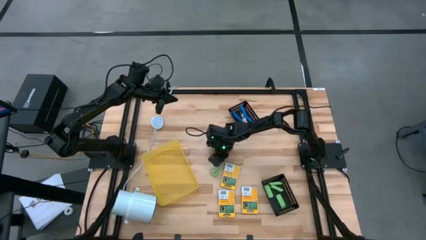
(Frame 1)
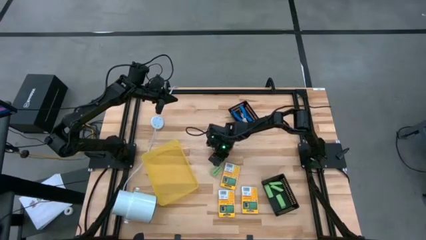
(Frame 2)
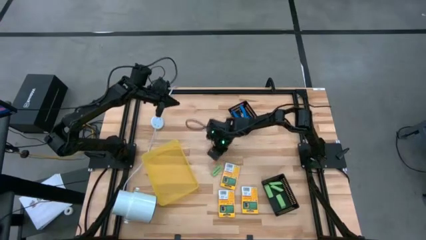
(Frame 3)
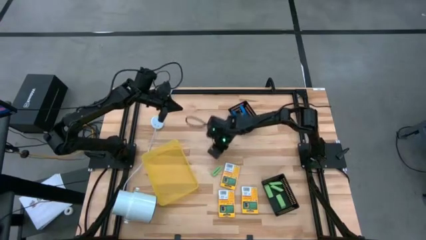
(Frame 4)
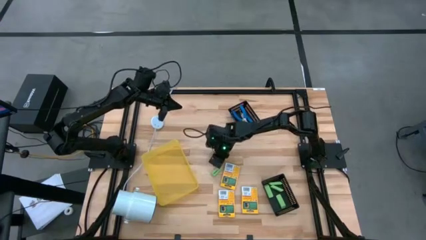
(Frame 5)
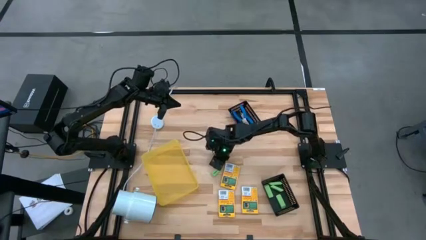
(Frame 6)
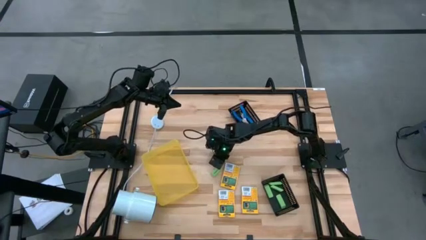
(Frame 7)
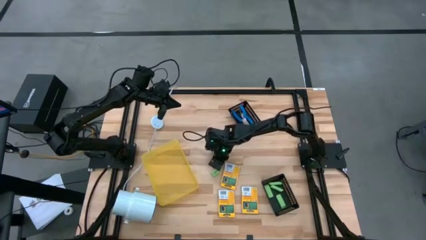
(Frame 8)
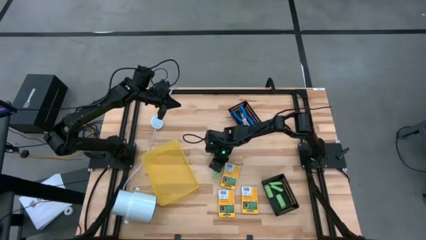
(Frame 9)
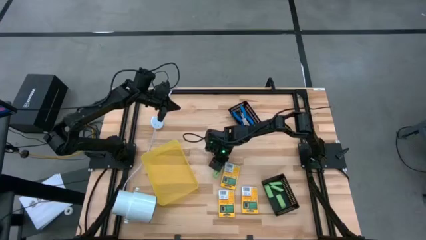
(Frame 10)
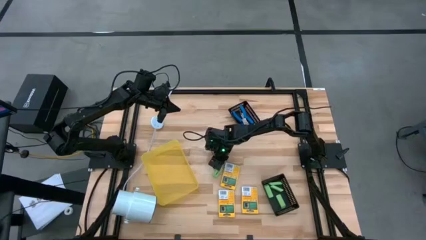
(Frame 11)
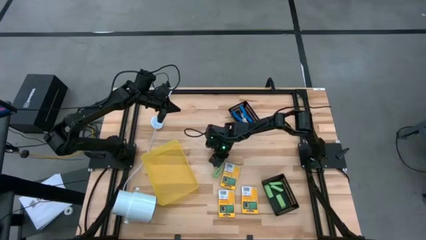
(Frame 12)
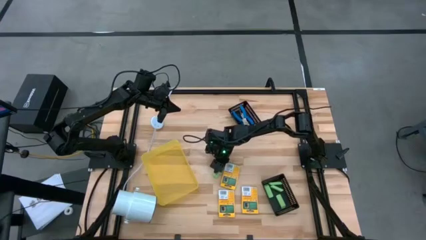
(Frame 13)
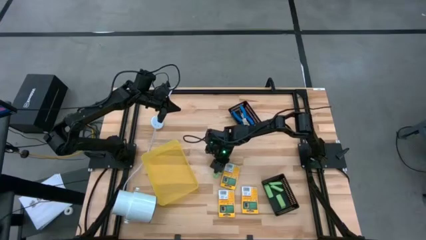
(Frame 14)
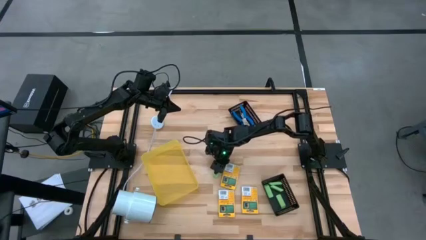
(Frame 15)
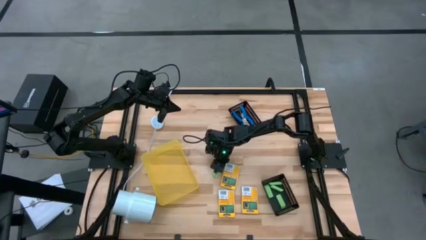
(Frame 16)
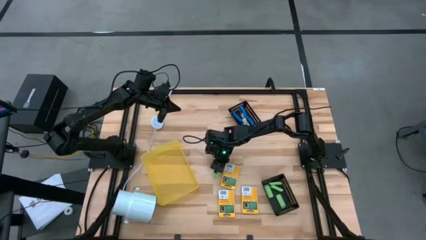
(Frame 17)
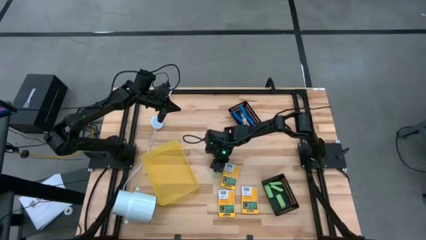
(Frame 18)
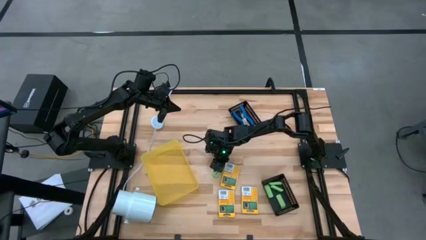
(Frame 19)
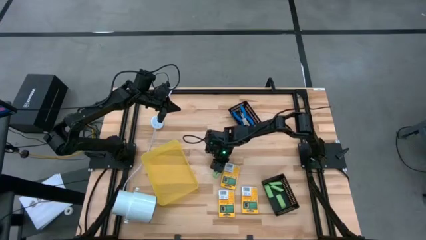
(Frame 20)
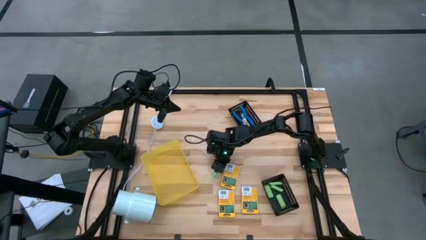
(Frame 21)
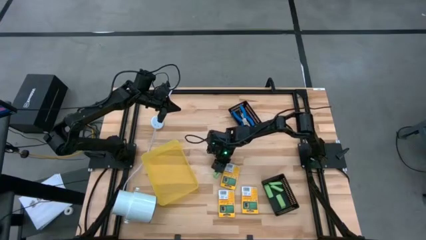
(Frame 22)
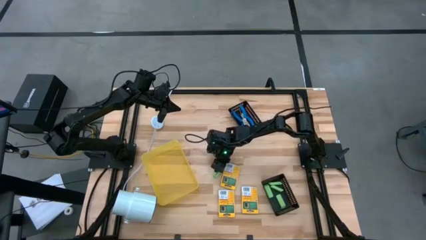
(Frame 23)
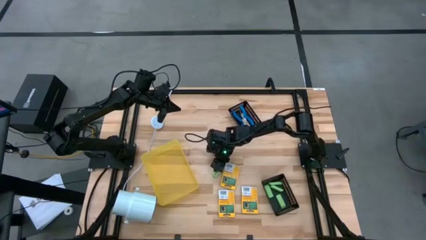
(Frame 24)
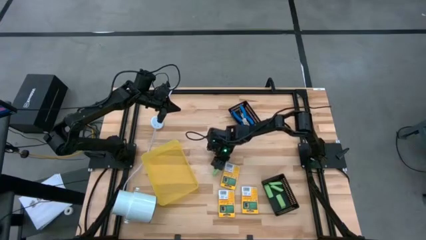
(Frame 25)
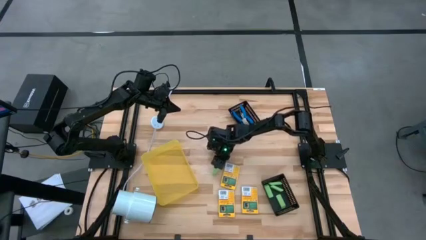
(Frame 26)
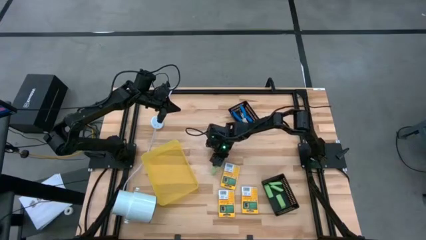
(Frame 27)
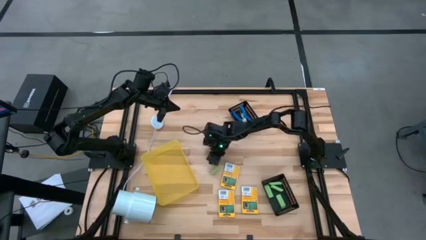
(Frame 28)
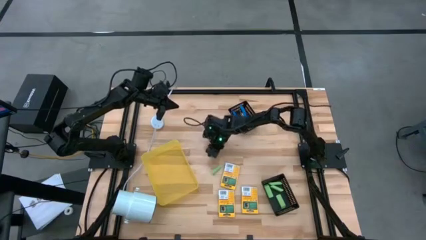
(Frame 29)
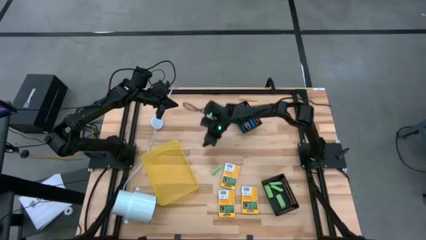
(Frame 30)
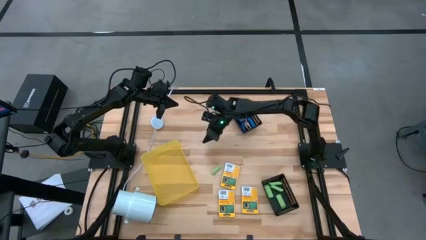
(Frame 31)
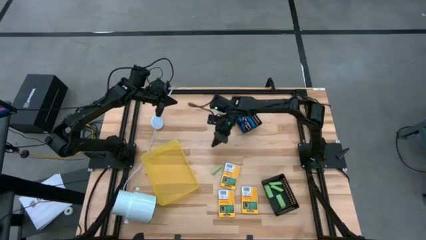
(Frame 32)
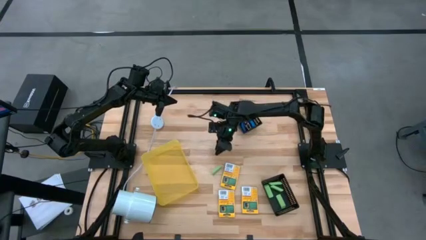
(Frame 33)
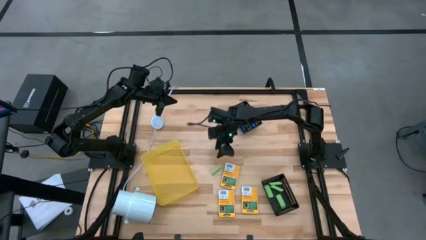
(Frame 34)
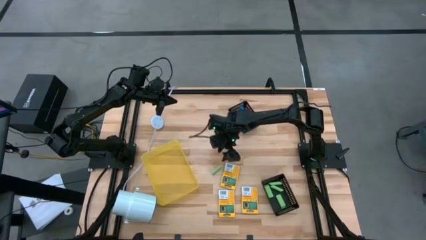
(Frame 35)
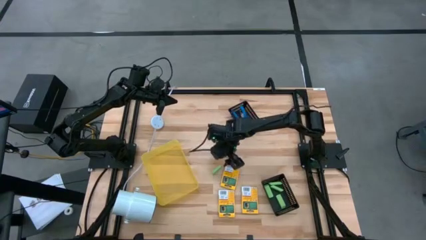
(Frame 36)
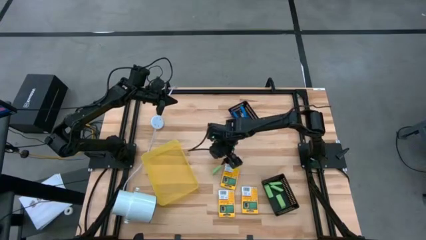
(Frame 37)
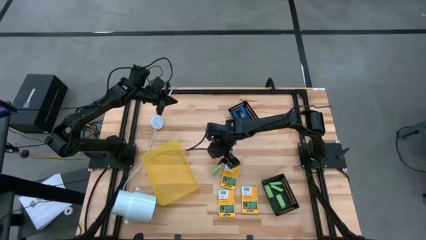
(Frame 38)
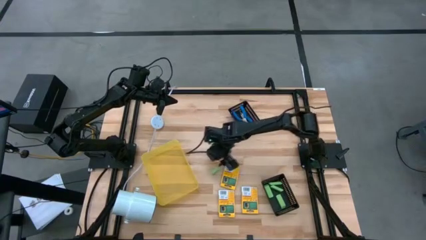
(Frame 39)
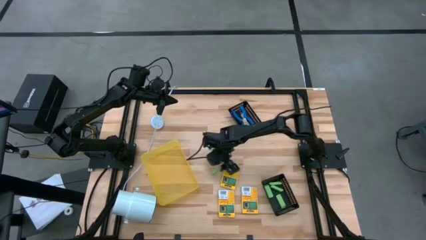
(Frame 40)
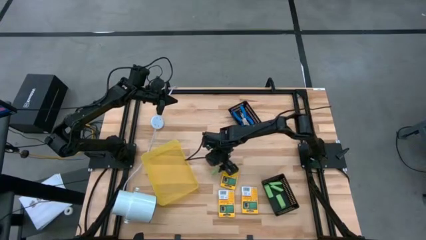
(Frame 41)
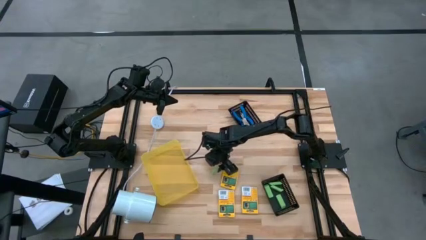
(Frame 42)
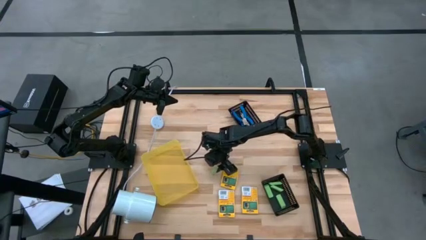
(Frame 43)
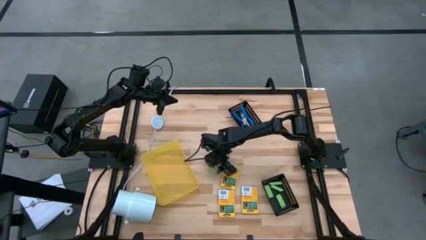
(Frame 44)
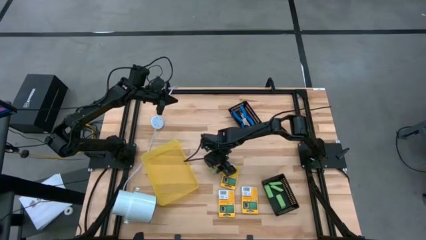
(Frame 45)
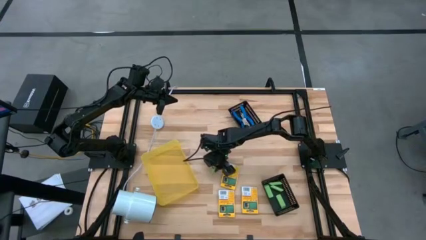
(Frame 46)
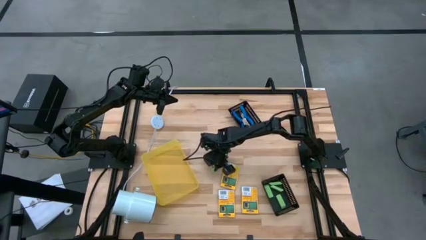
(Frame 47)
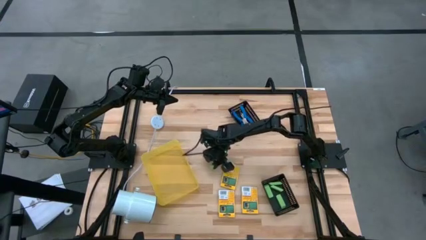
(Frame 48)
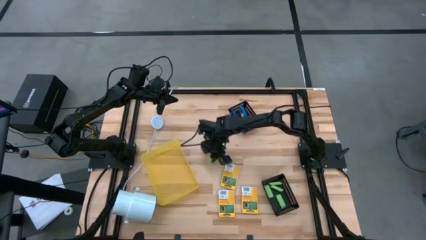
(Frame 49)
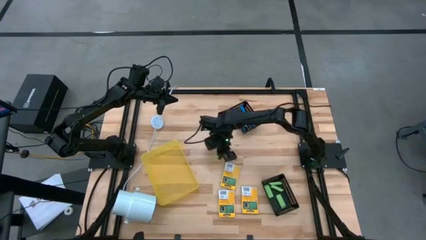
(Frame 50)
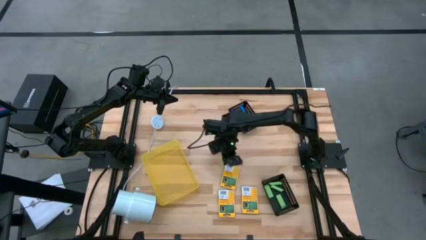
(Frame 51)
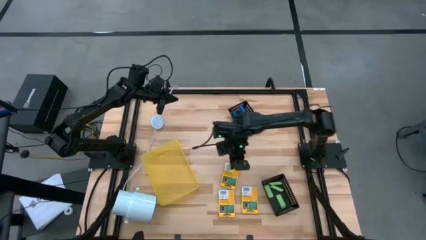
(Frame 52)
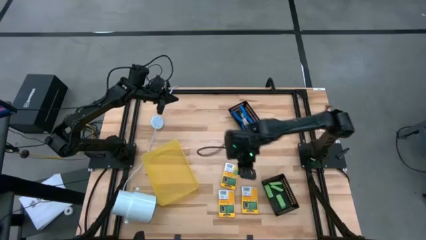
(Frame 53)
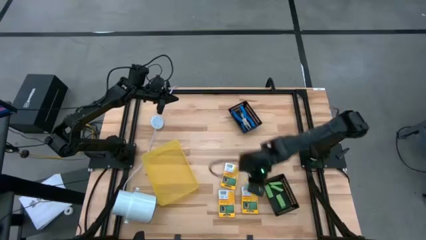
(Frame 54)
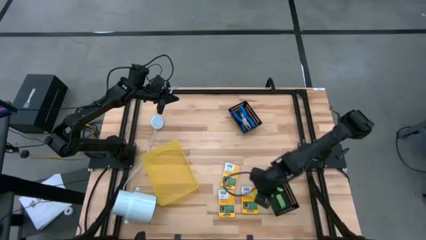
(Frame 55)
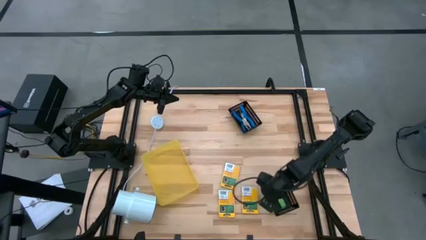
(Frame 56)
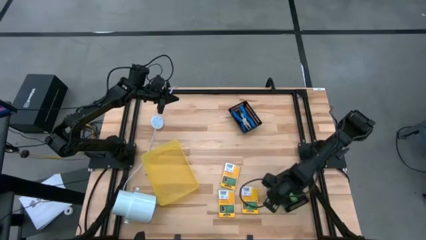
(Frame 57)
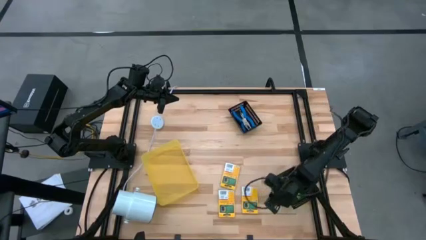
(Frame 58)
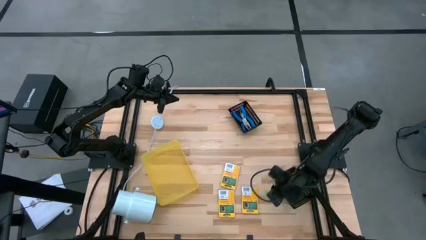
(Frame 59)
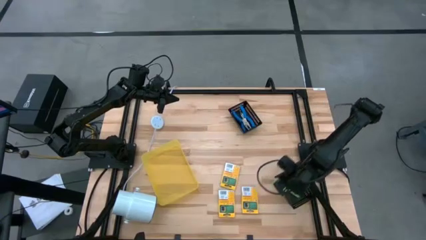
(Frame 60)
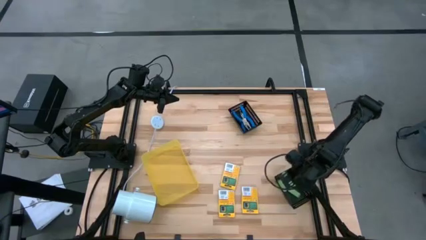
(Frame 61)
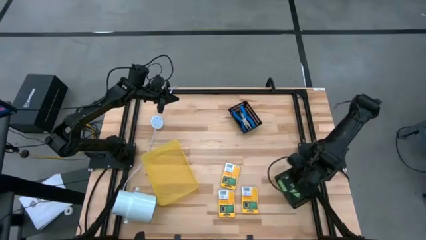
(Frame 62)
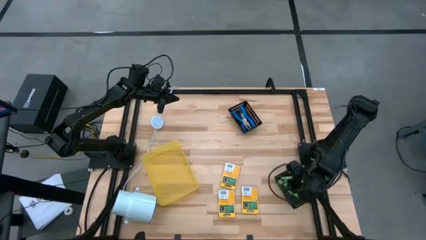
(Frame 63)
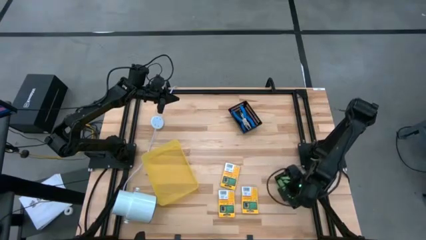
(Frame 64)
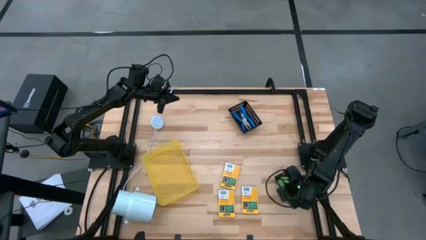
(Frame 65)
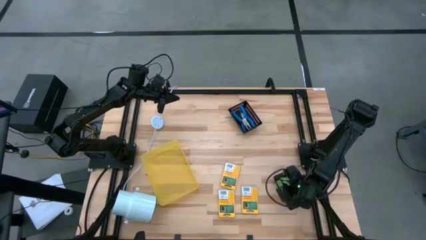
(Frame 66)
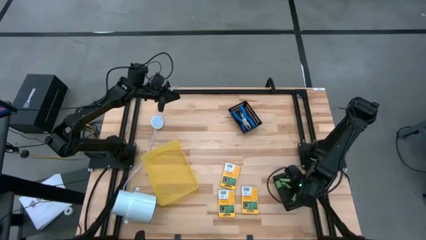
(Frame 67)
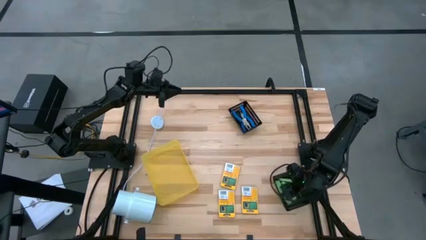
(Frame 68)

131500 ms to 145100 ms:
Task: Pick & Place School Supplies
Put the green eraser into the bottom black bin

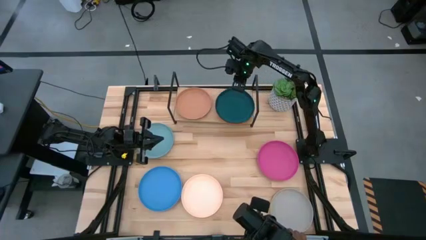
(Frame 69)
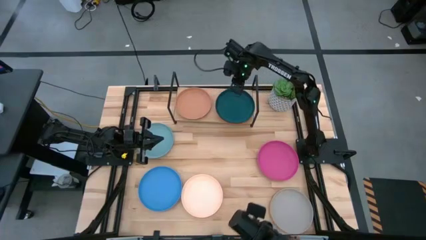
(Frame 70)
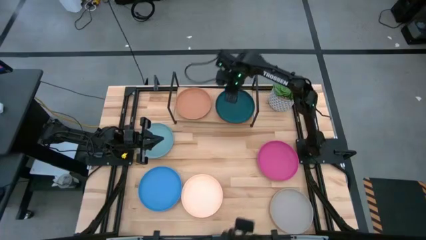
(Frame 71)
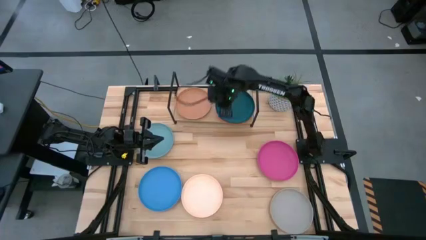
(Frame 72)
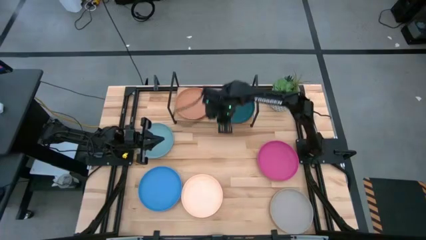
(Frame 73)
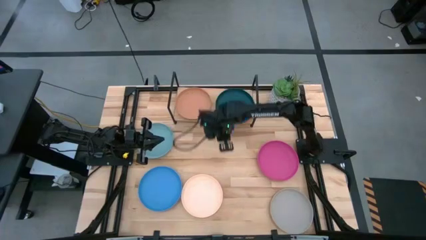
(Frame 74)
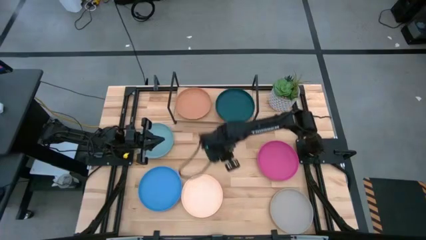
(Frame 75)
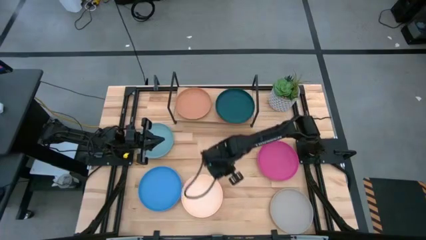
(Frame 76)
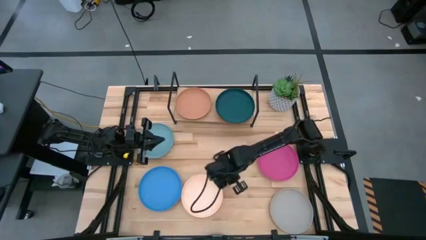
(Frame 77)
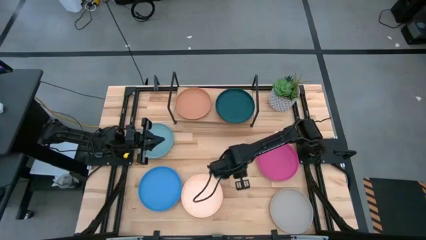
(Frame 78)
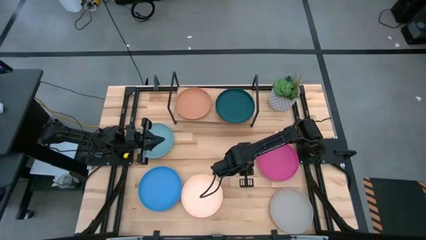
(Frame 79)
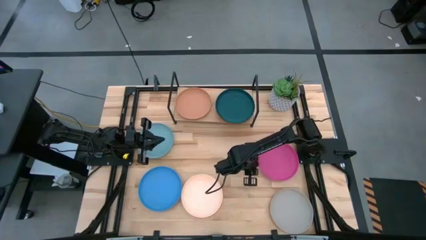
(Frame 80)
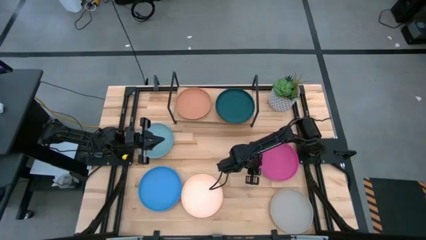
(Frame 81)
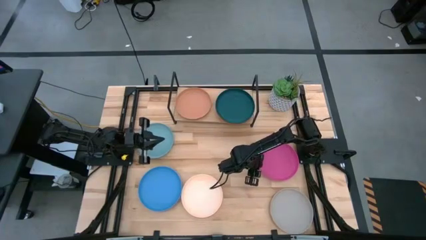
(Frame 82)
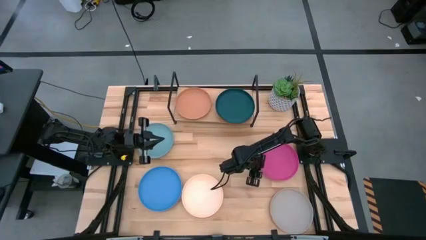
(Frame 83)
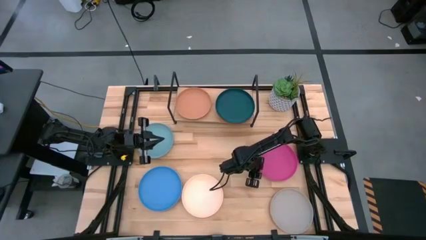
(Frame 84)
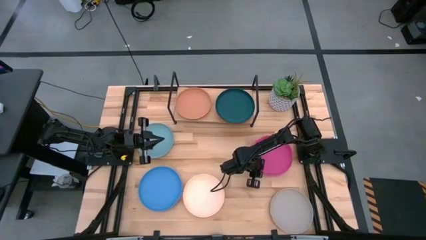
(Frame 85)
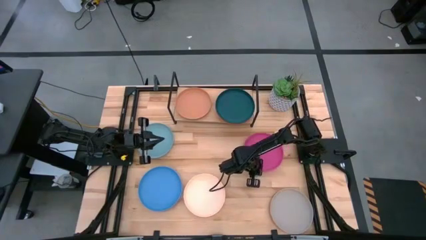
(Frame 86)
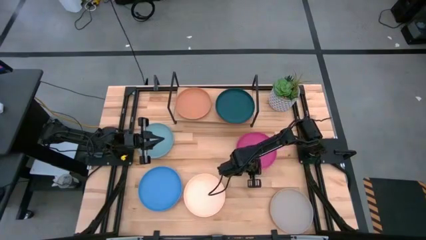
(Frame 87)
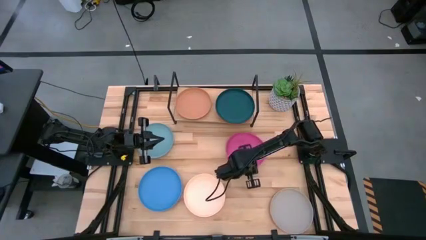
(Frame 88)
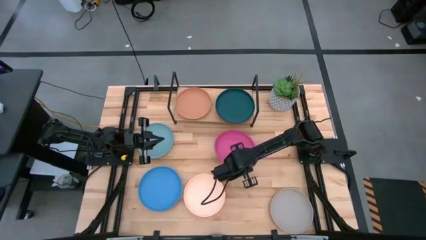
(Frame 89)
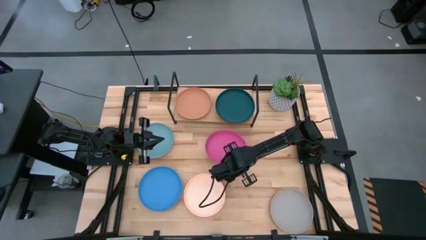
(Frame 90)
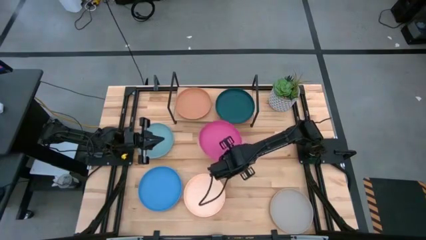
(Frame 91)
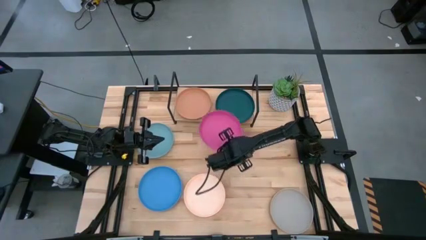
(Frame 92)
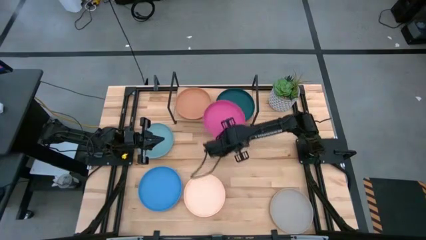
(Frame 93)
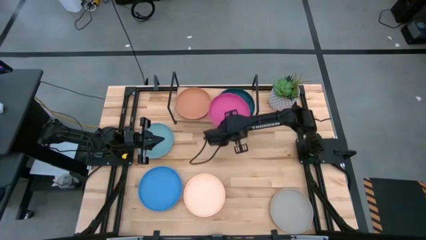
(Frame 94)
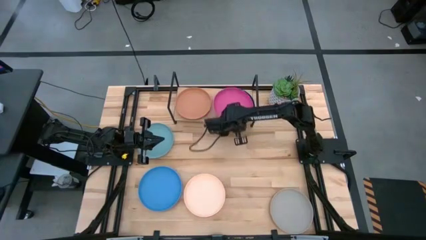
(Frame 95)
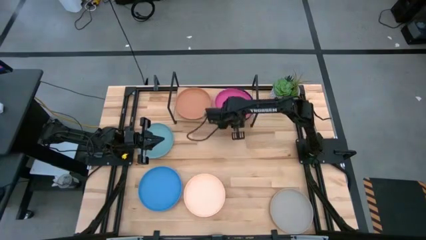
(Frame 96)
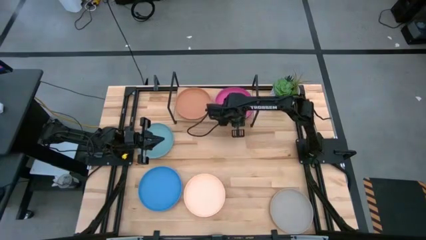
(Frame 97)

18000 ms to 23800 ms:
Task: Place and stack plates onto a shelf
Stack the pink plate on top of the dark blue plate on the shelf
